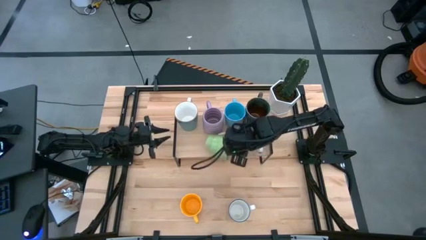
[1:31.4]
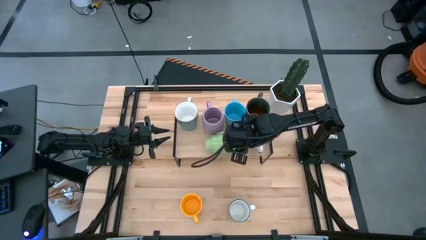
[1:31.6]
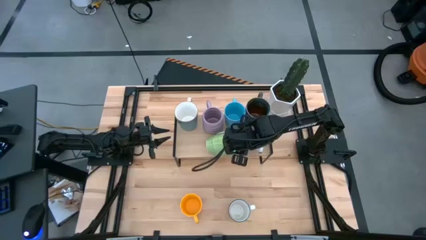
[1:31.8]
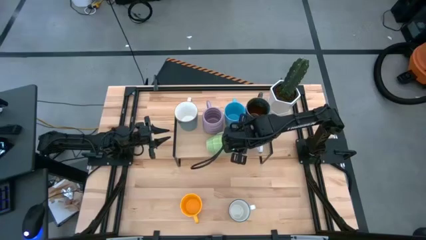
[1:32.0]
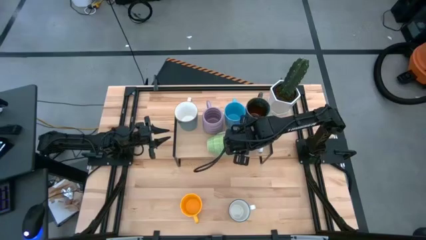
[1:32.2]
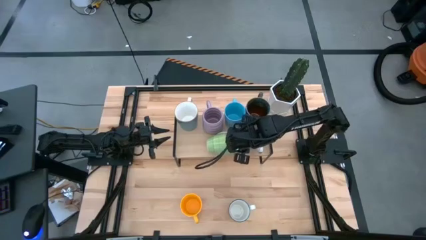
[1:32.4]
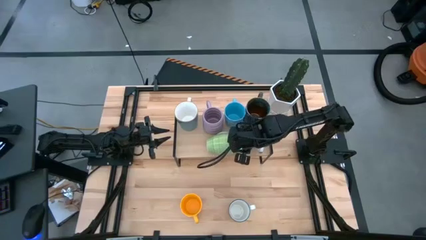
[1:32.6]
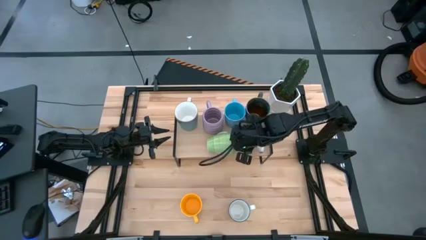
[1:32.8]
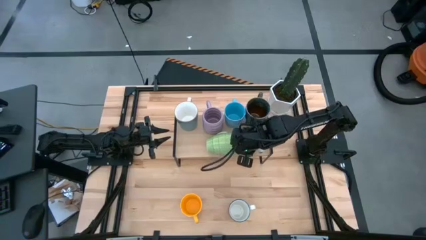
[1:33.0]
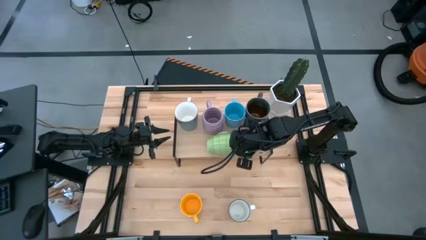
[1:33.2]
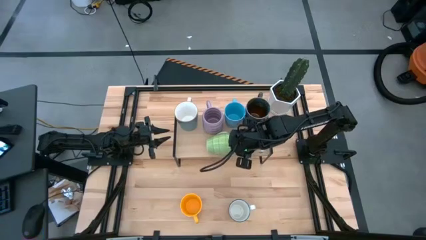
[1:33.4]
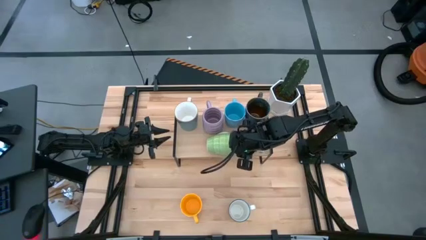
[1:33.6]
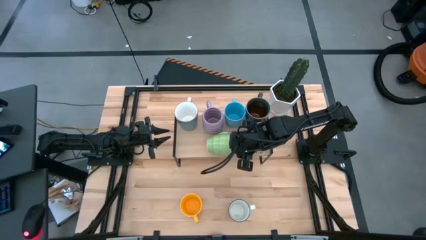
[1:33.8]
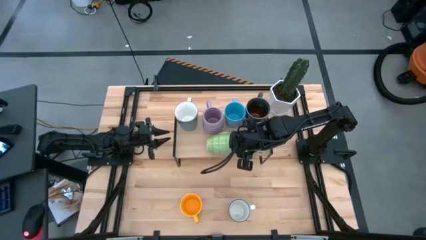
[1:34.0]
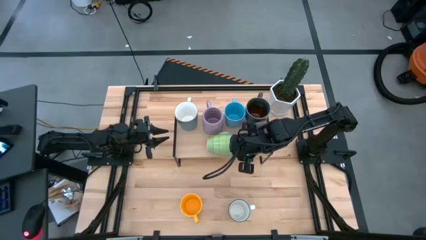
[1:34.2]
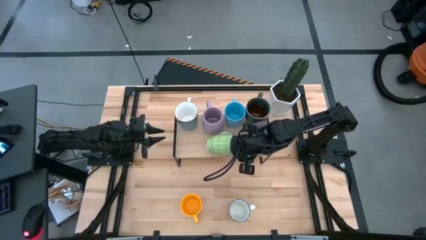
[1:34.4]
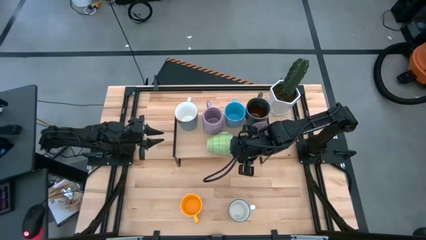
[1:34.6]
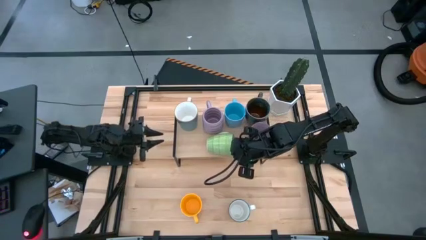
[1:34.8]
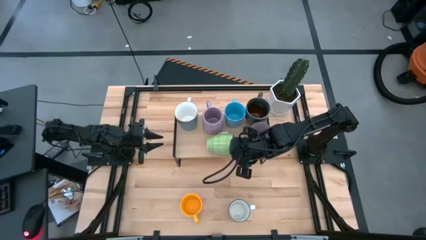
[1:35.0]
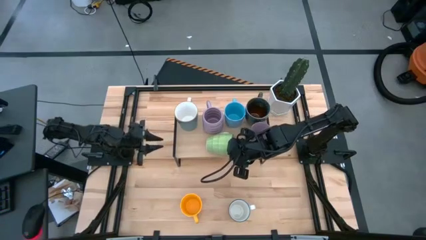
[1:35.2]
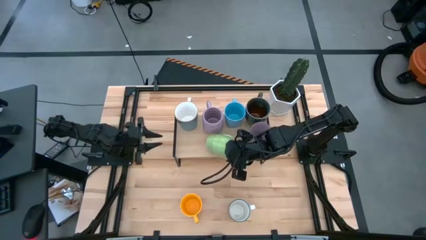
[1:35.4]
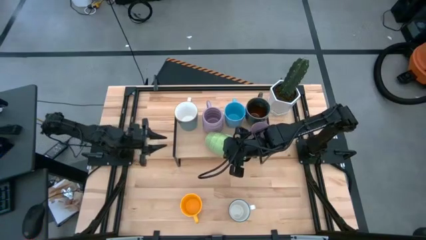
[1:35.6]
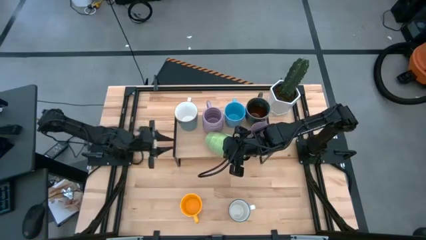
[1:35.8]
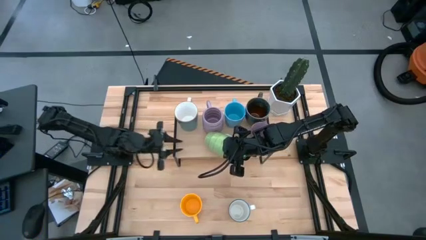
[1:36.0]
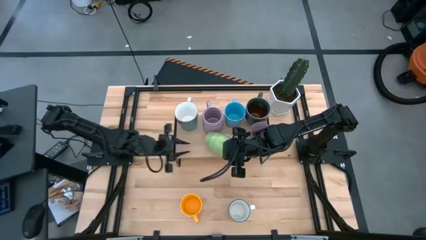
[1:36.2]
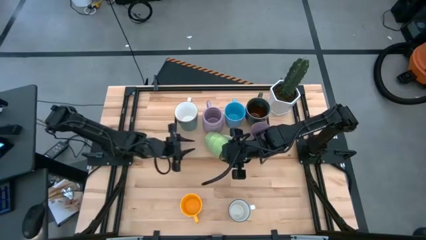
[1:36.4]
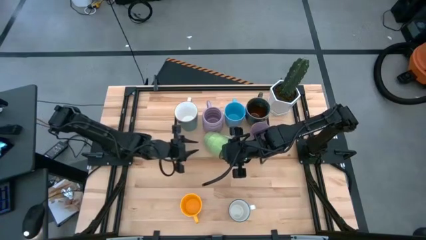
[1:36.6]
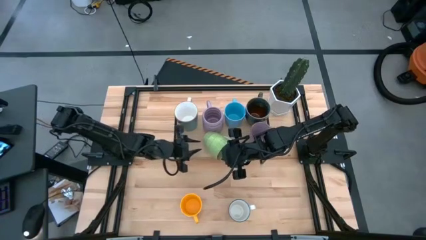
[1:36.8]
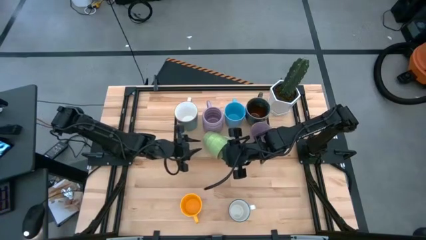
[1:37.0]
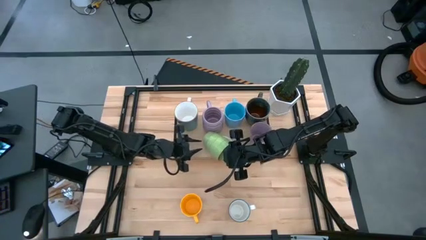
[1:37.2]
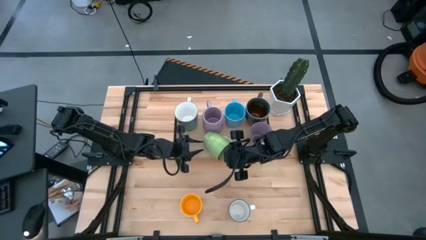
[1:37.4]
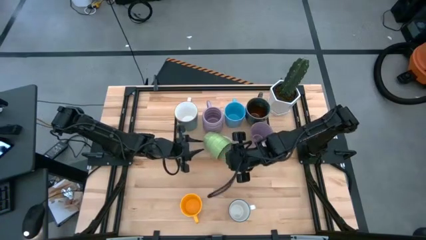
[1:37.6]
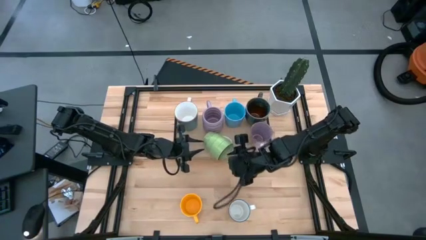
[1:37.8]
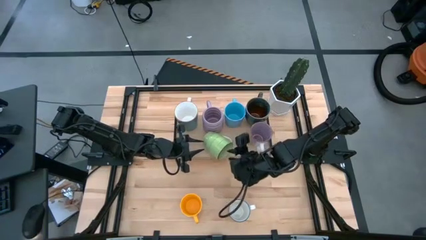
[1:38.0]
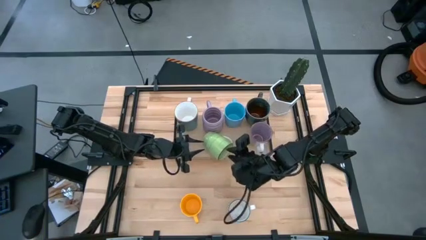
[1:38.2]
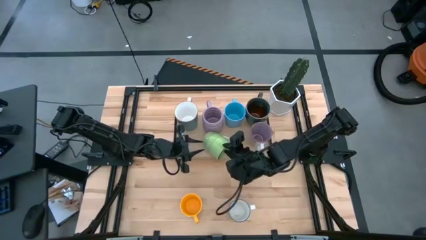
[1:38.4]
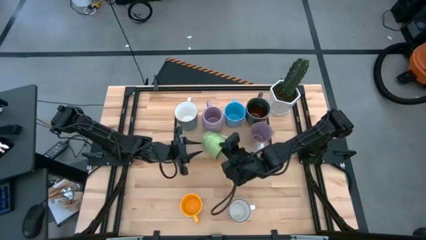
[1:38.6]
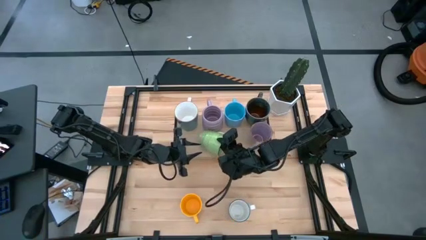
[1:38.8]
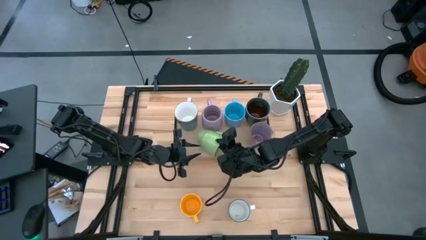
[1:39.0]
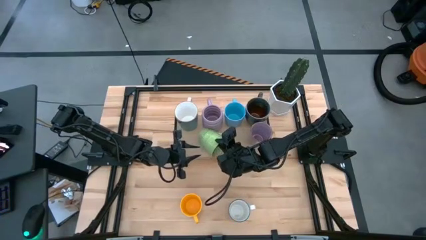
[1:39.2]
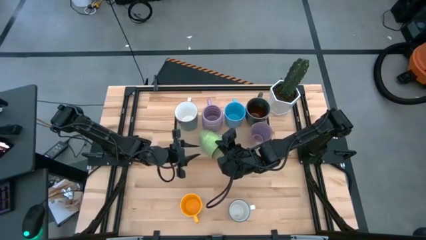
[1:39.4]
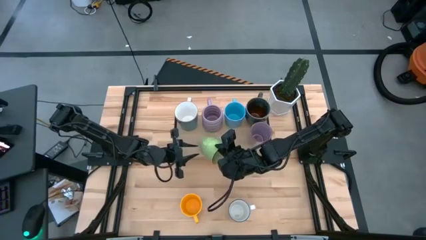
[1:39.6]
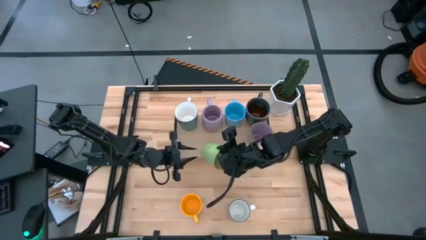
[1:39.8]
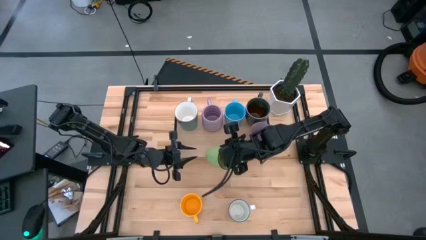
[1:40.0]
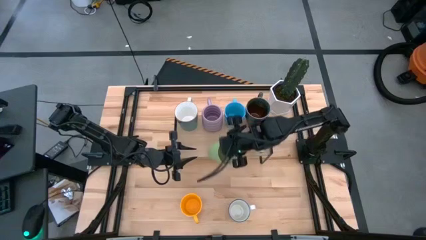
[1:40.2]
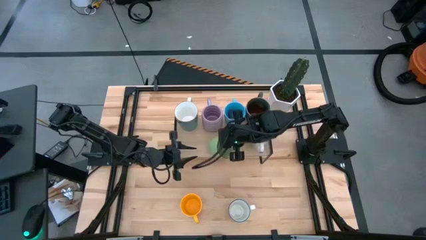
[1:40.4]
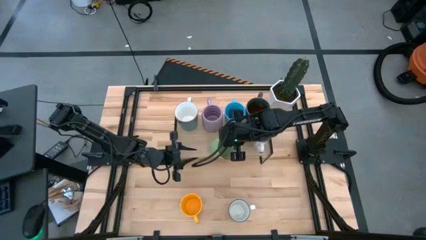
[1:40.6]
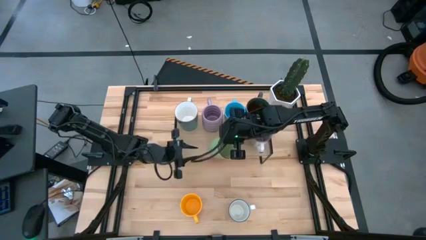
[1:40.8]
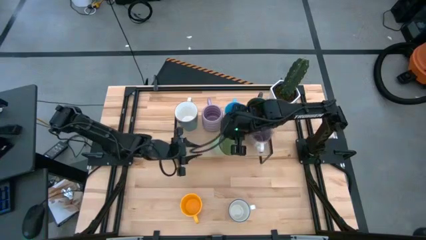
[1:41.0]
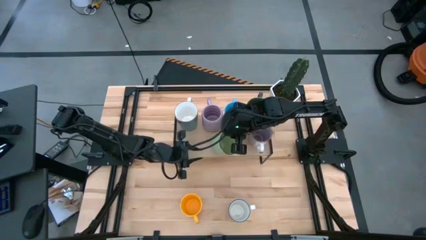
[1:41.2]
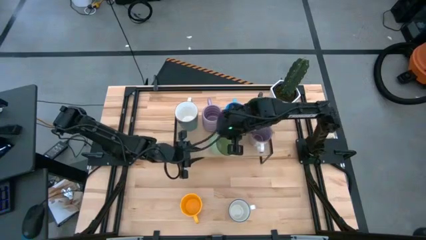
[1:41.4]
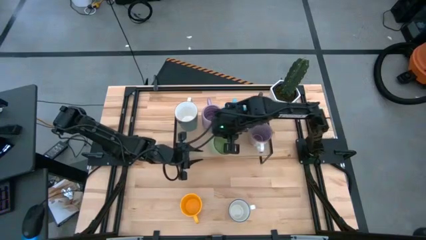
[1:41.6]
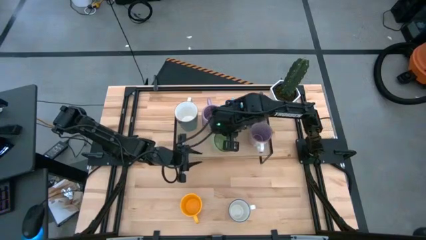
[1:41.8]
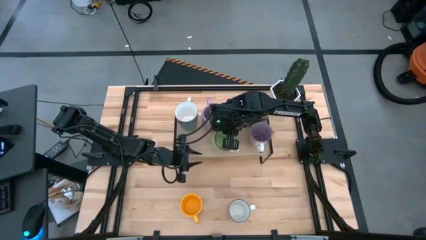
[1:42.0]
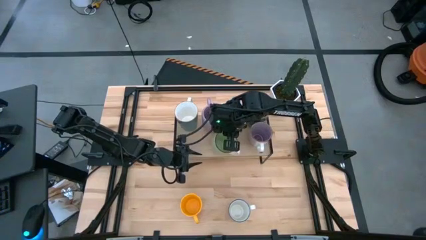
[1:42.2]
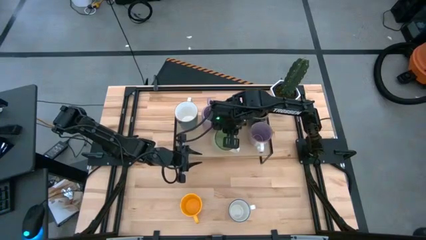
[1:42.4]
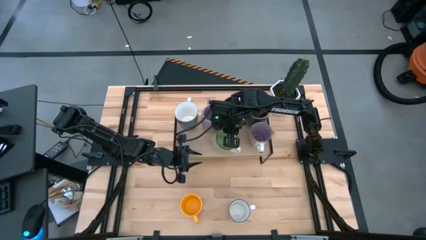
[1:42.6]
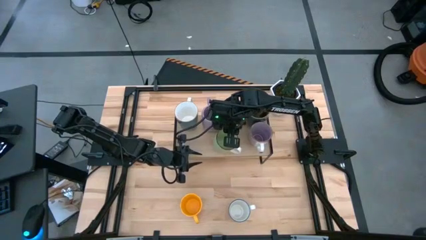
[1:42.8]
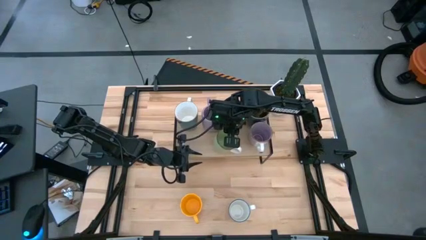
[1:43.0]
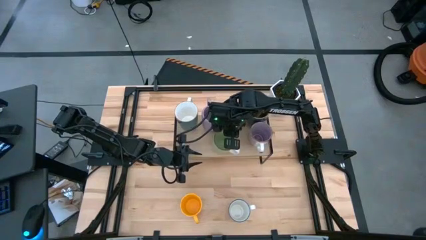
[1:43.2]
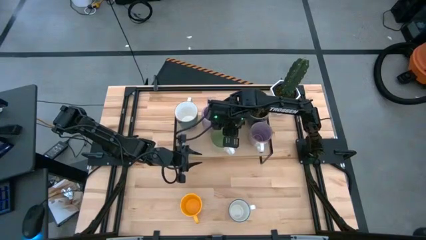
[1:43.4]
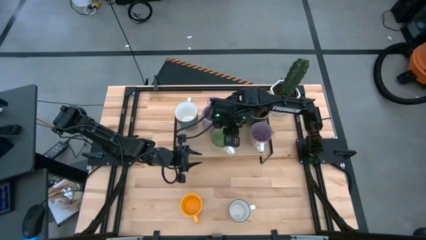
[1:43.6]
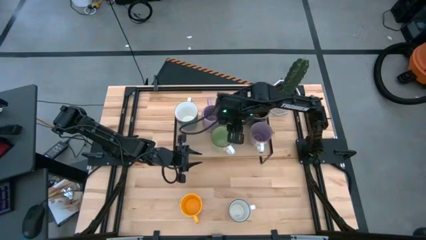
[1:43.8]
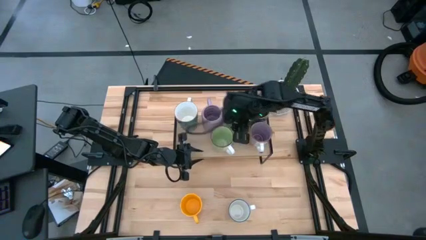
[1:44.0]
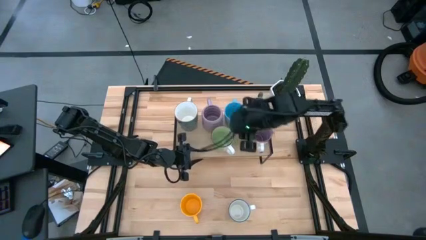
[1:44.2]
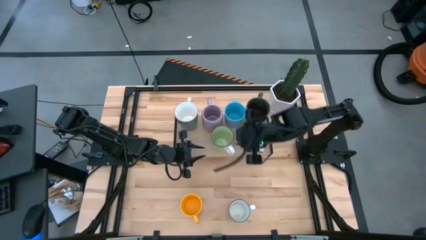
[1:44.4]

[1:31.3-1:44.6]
Task: Place coffee mugs
Adjust the green mug on the shelf
